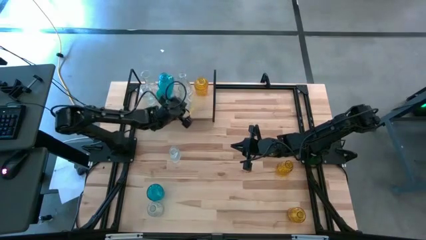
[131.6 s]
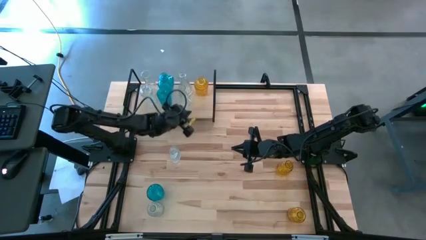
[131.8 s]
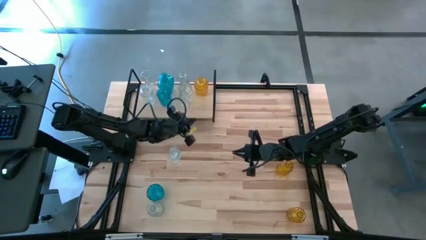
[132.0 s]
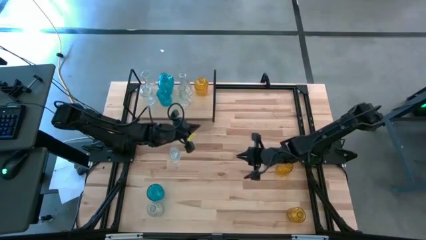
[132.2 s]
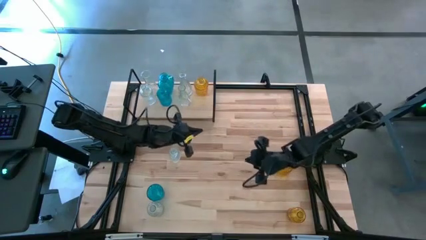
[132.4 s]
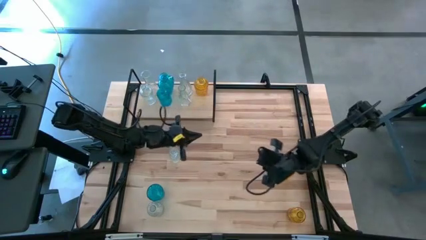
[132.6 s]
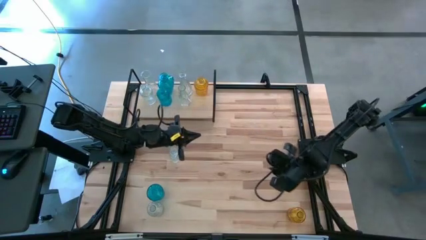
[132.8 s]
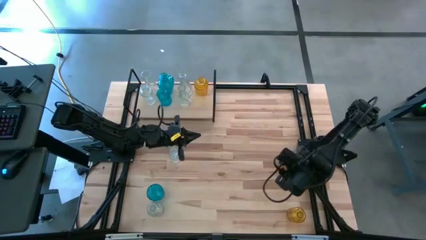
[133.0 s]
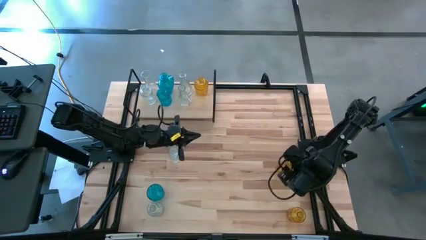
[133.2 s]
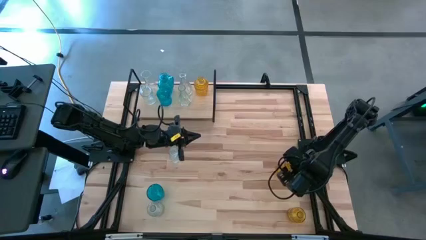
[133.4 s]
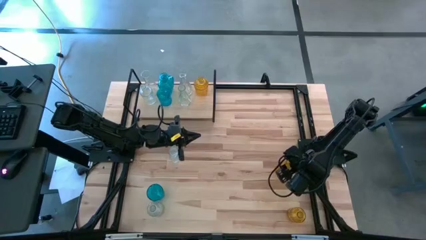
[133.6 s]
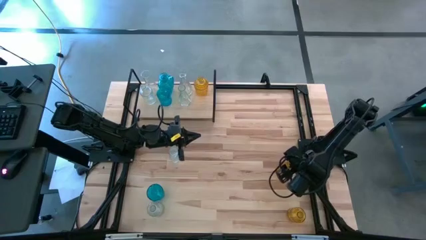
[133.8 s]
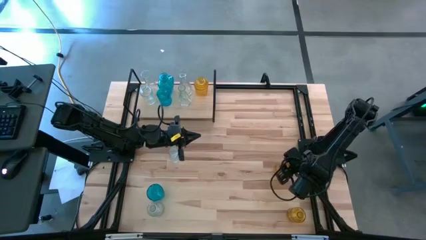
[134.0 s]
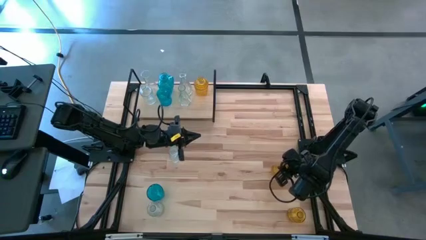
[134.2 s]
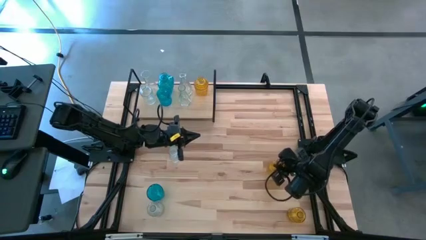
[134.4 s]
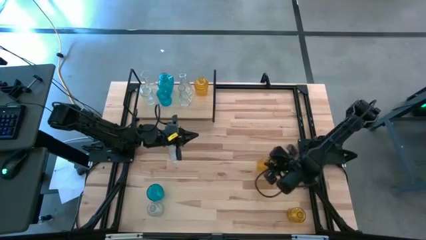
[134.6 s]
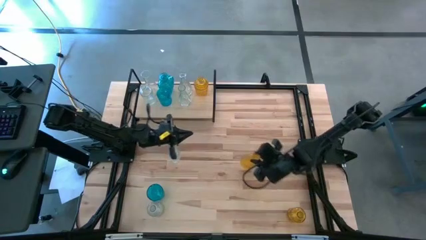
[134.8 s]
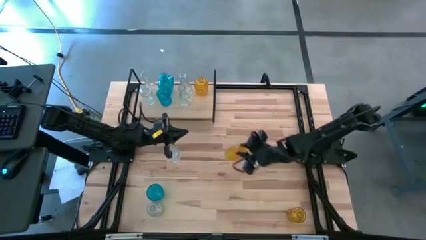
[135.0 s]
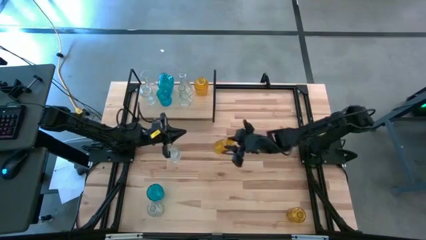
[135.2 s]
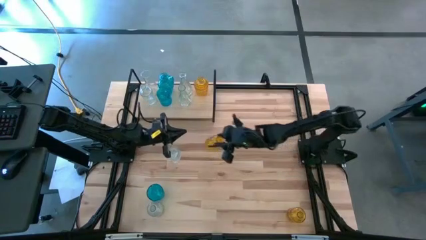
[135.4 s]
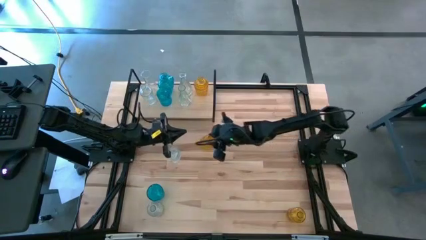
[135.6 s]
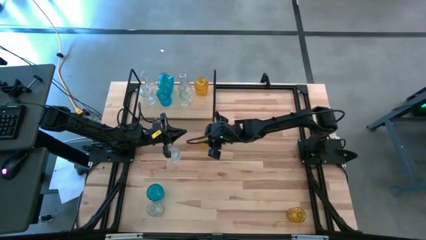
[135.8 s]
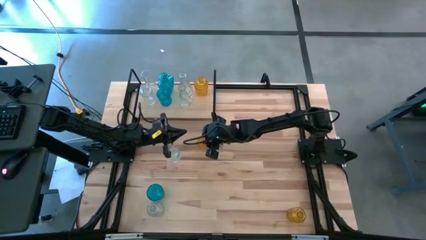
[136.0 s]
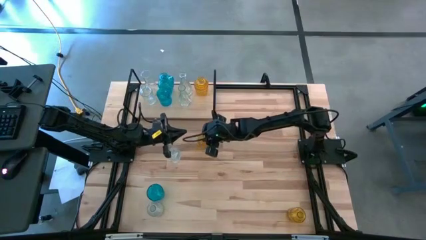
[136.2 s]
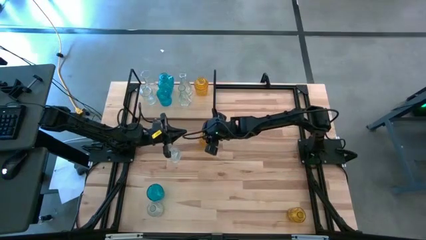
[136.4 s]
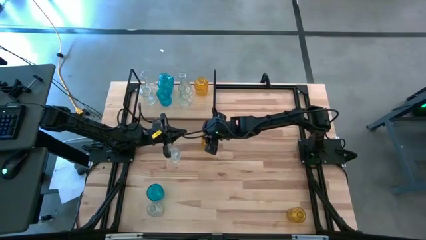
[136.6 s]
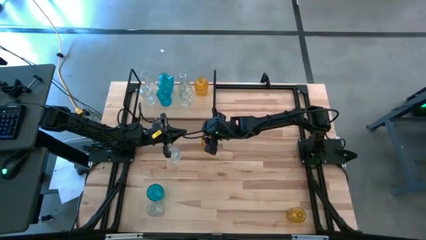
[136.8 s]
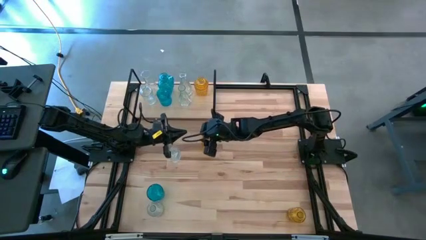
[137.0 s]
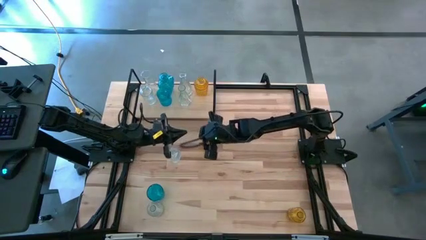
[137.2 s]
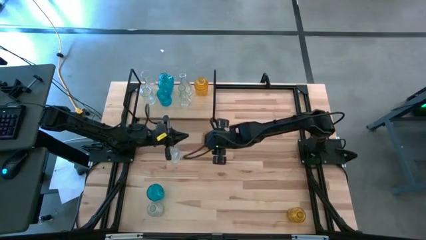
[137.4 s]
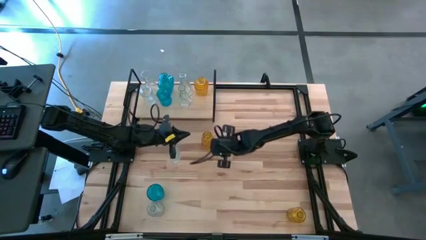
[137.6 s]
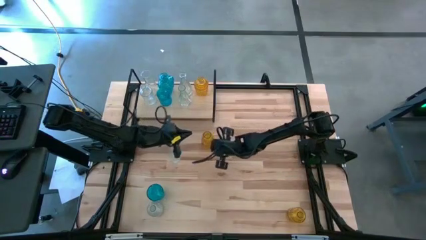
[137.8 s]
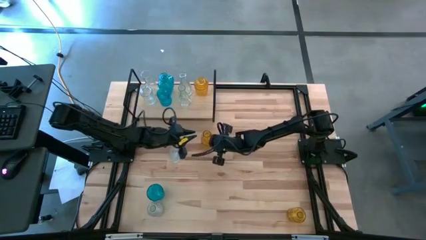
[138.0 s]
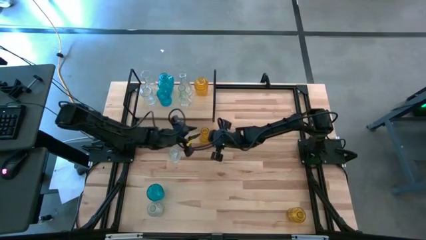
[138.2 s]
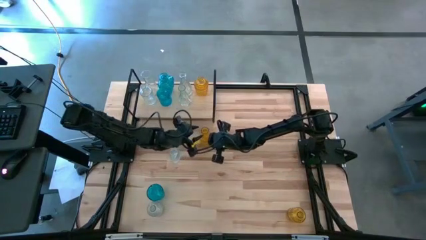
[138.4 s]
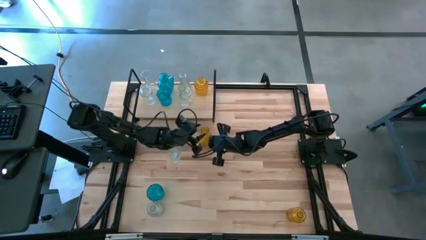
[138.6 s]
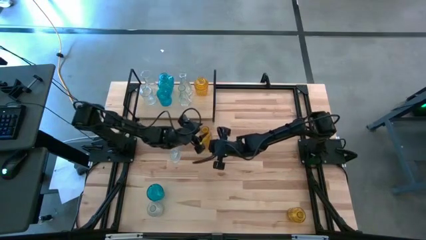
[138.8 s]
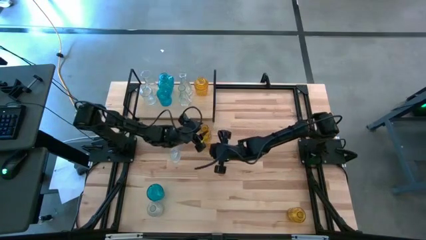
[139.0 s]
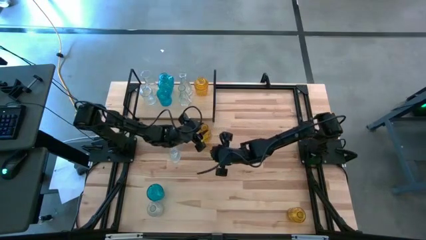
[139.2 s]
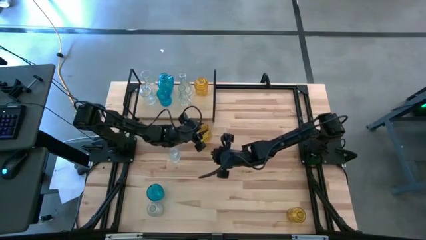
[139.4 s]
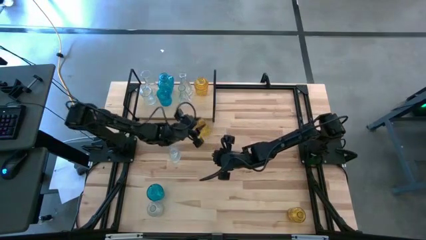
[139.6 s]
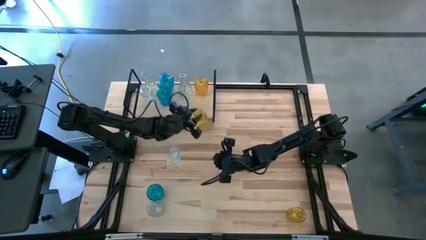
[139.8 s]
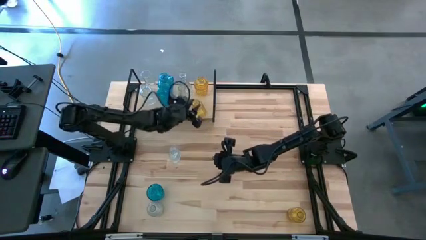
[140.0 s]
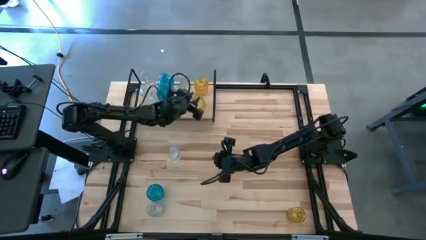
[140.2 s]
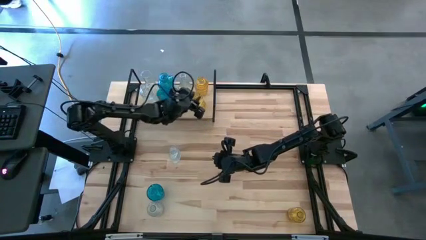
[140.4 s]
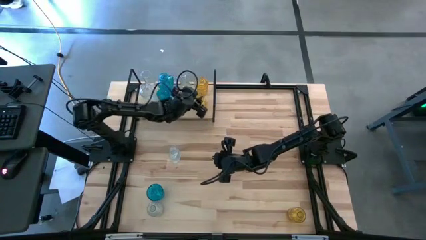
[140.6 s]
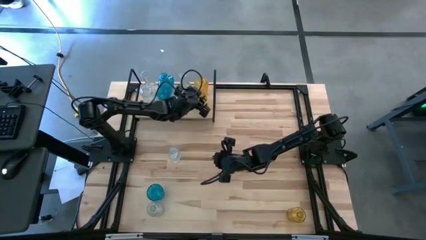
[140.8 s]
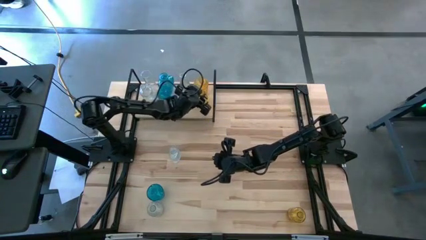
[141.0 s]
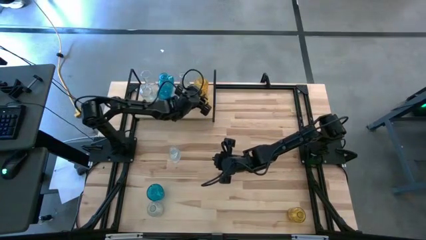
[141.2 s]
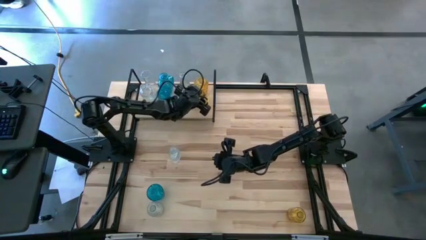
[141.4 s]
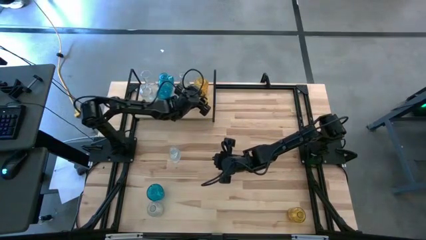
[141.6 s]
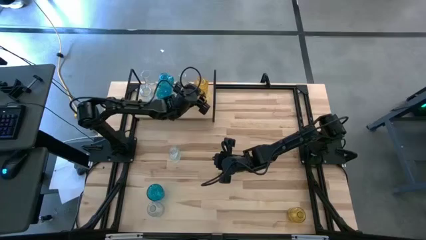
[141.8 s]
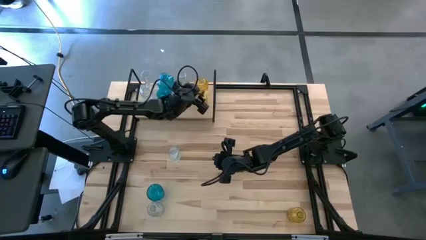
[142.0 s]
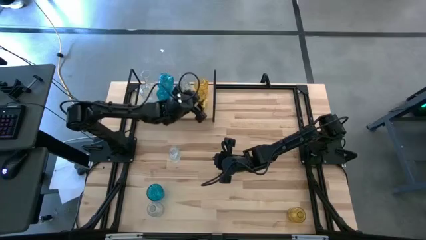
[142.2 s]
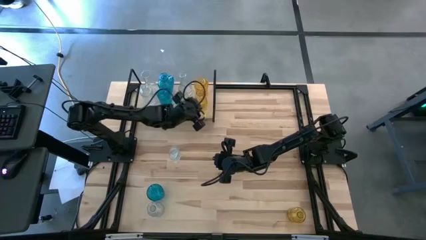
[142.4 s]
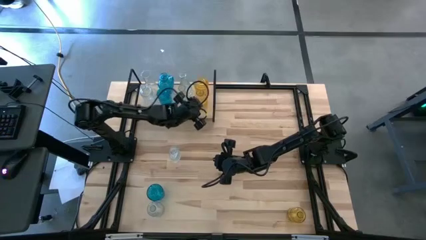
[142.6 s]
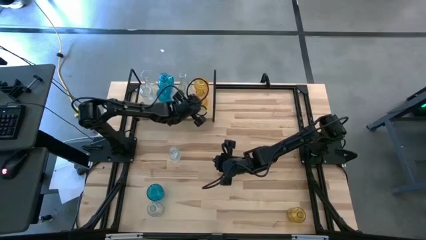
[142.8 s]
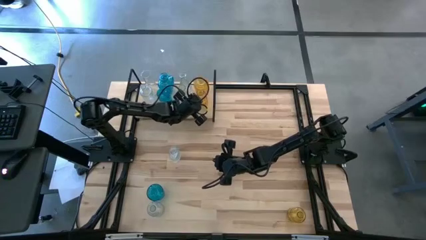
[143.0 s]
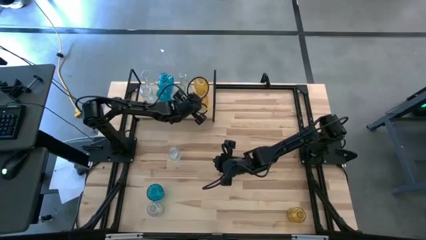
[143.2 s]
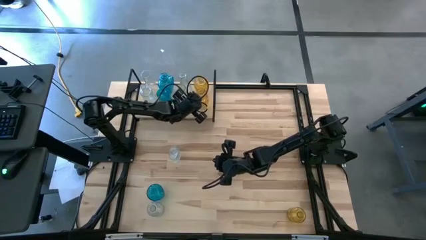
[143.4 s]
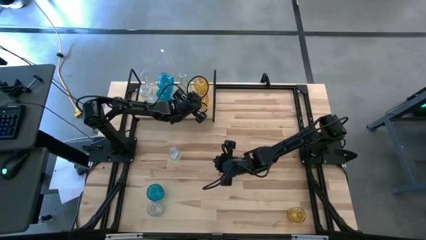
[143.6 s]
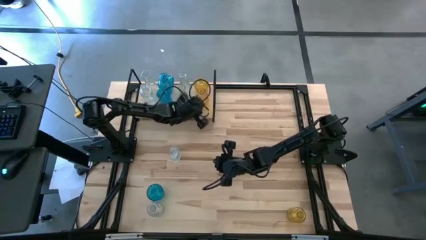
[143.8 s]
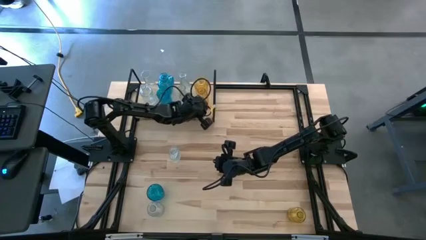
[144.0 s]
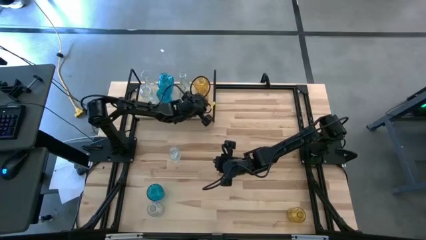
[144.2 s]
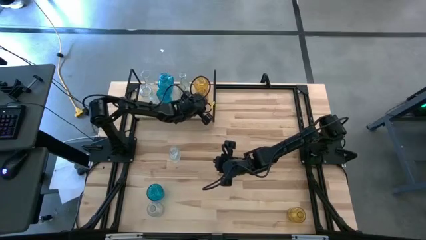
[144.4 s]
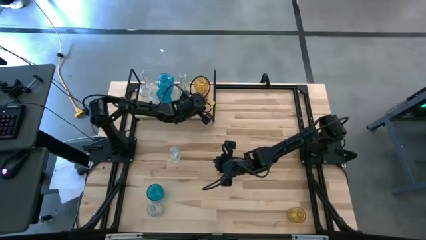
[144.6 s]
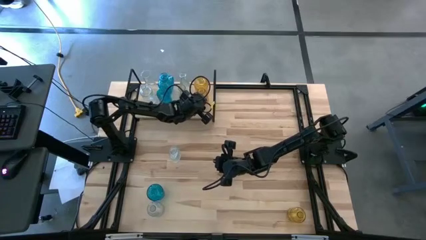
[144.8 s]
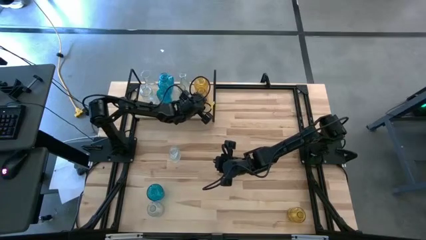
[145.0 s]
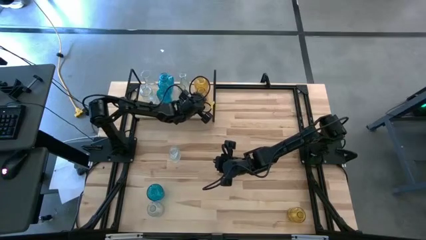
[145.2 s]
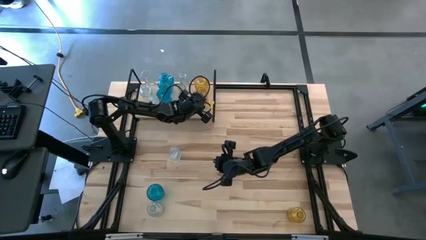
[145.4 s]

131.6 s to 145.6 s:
Task: sort vases onto shelf
Put the yellow vase on the shelf aligned with the other yellow vase

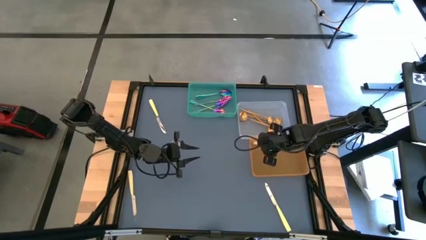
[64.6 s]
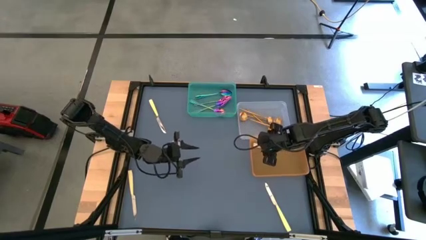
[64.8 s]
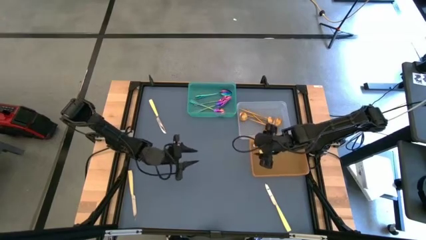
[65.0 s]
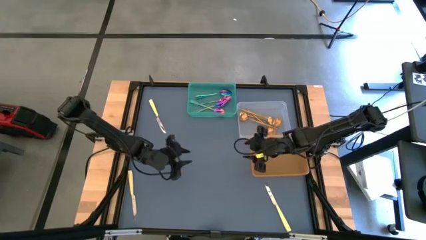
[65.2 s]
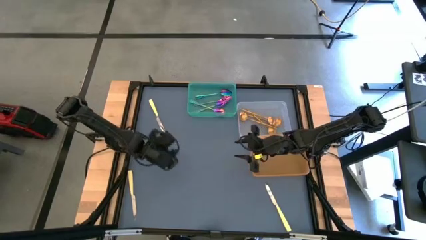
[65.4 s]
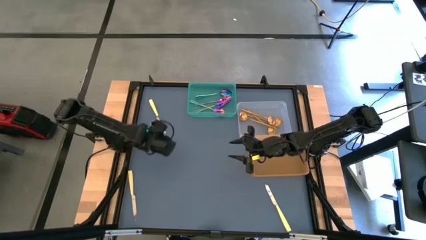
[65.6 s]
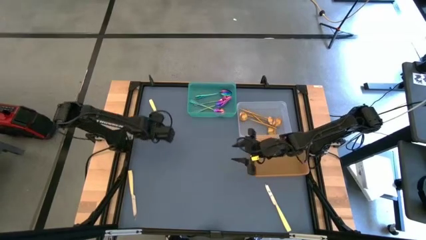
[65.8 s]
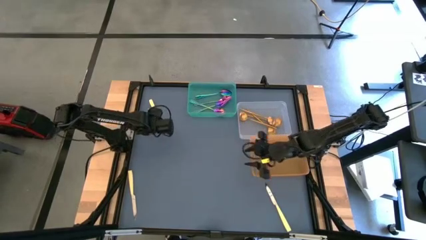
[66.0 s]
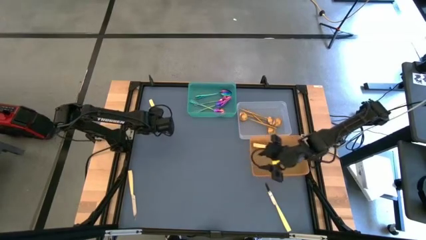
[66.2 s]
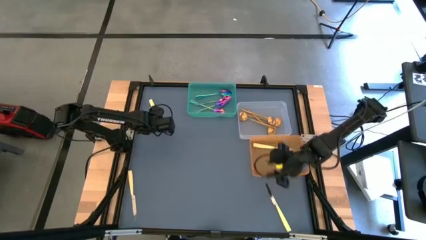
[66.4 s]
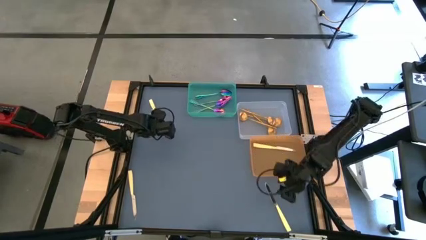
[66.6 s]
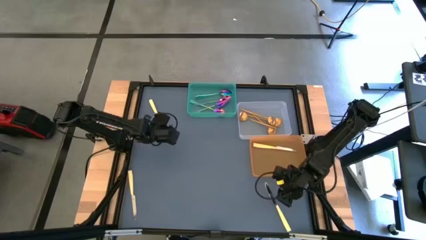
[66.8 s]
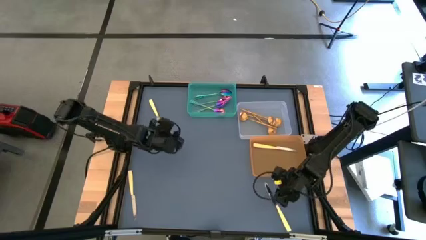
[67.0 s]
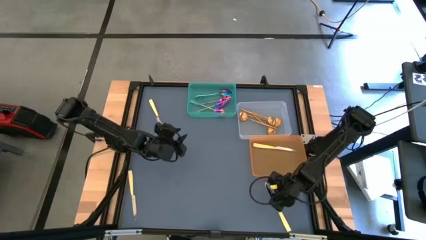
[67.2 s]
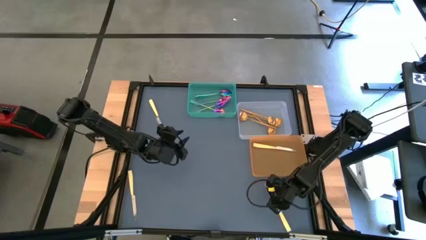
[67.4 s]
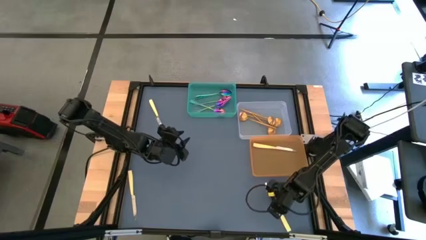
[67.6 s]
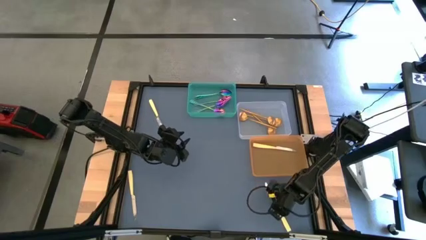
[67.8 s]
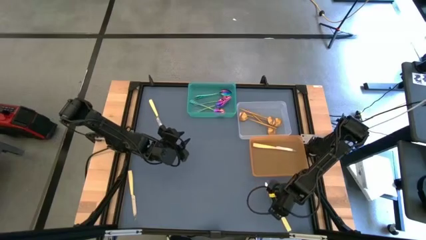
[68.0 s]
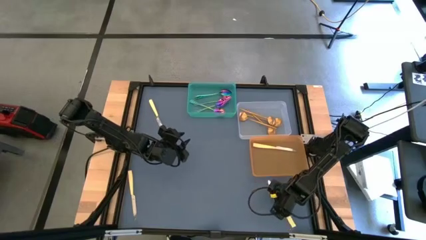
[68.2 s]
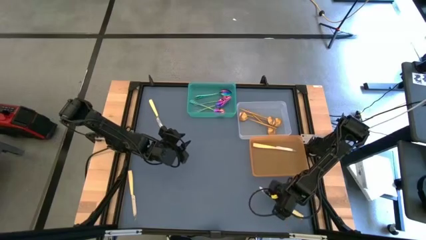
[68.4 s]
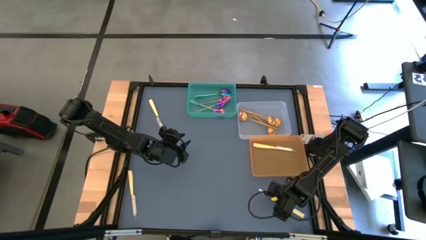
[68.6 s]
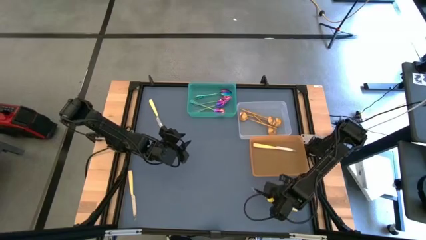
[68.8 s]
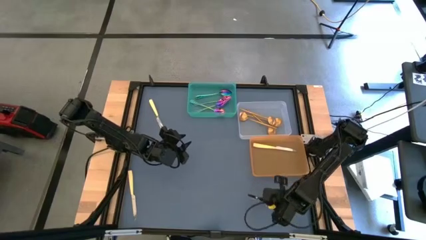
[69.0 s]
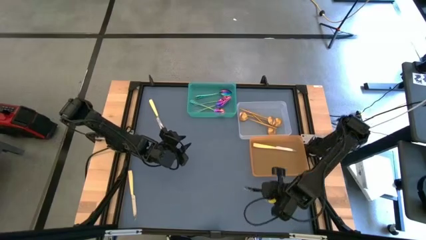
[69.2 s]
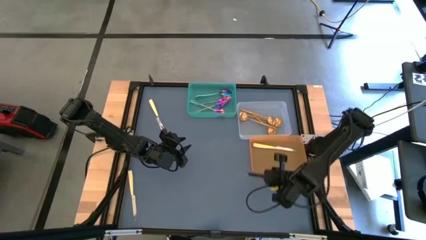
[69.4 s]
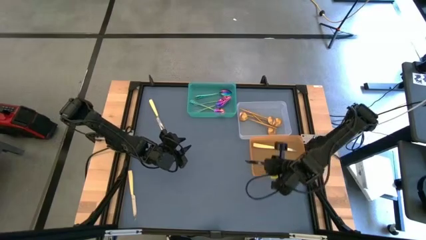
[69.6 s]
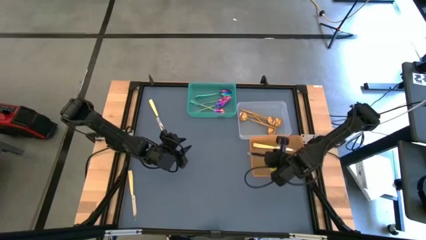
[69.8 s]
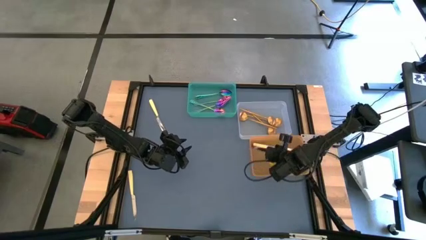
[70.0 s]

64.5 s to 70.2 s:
Task: Sort silverware by color (type)
Put the table knife into the orange bin
